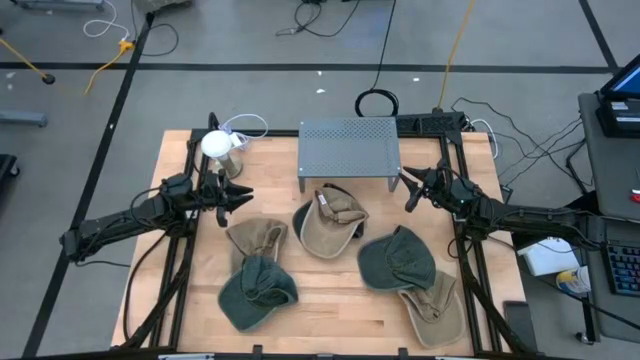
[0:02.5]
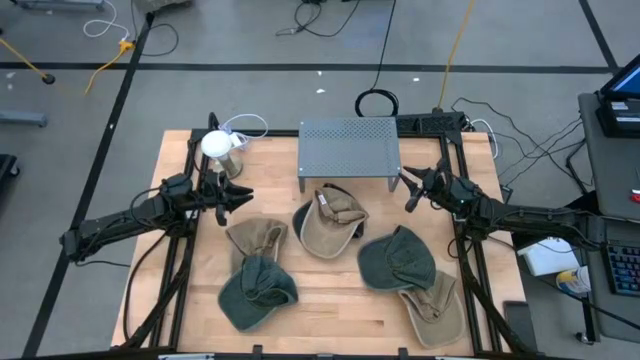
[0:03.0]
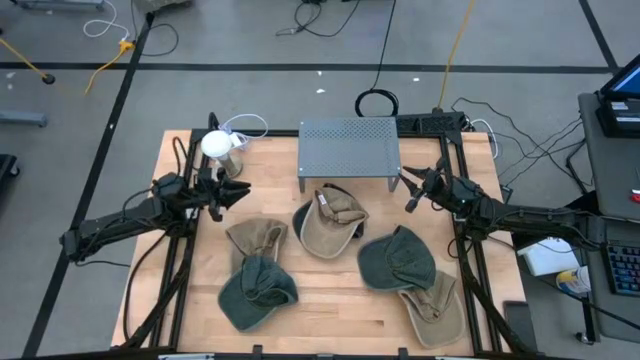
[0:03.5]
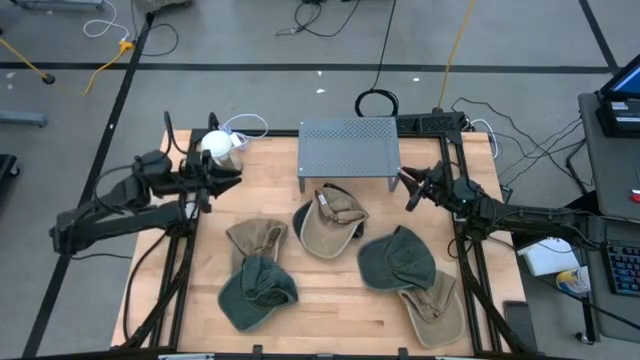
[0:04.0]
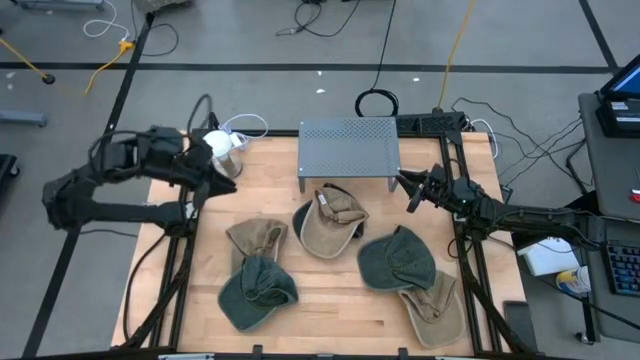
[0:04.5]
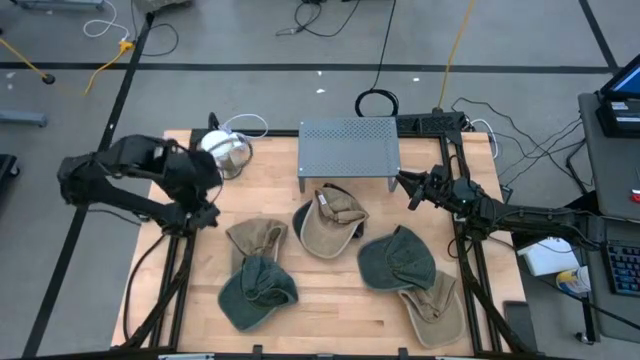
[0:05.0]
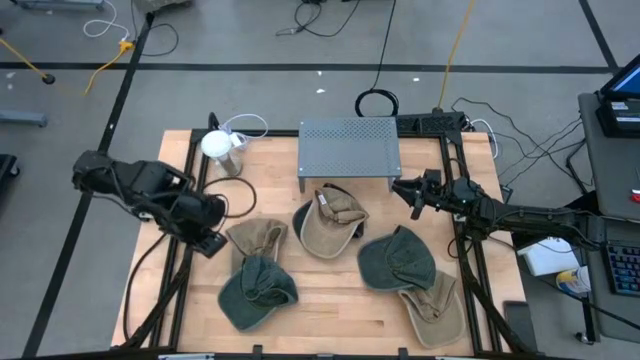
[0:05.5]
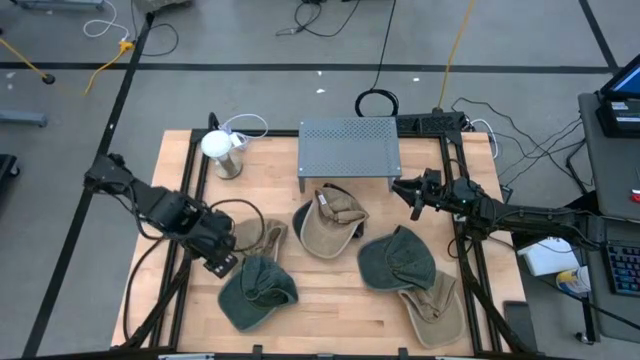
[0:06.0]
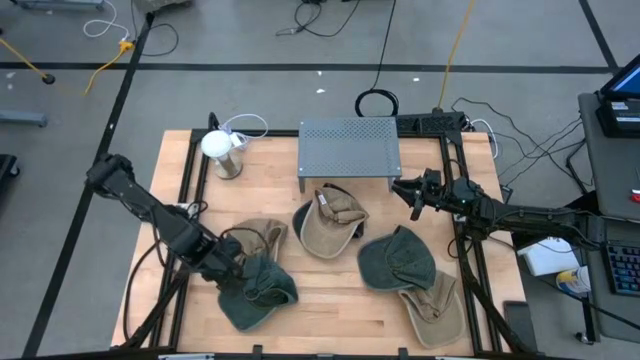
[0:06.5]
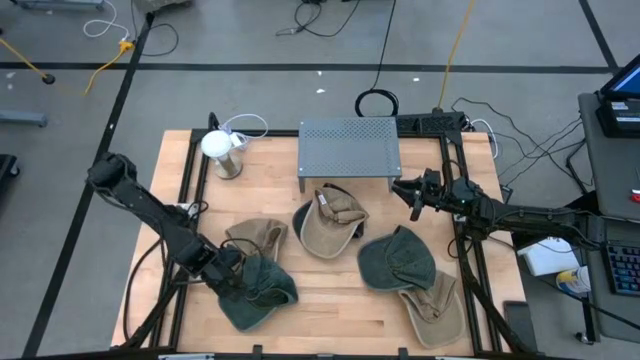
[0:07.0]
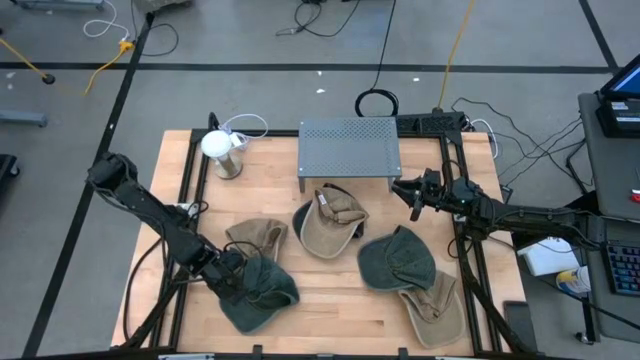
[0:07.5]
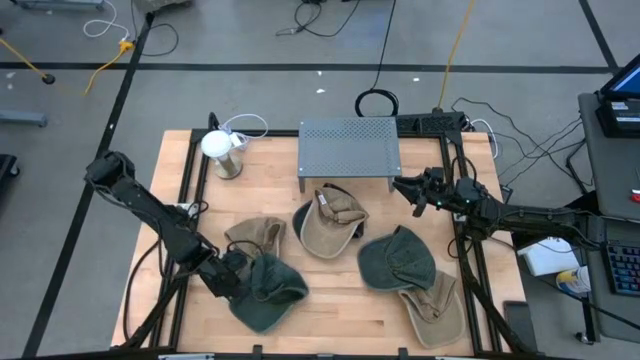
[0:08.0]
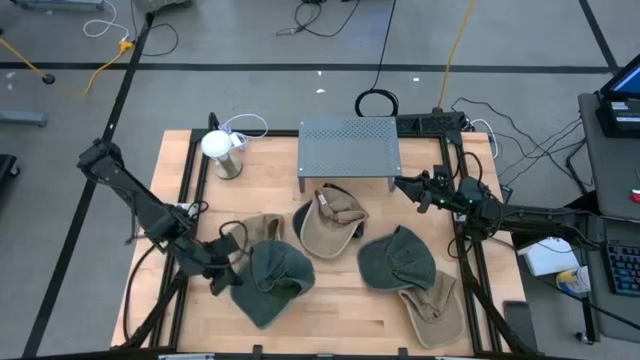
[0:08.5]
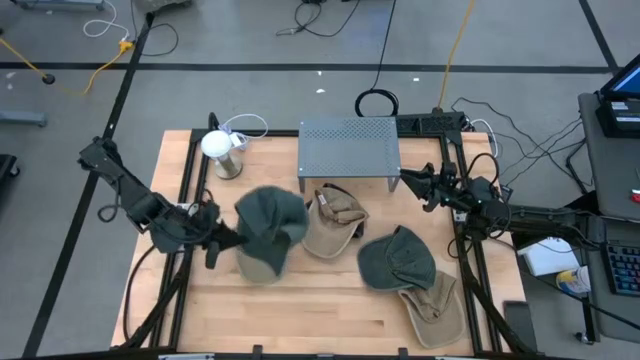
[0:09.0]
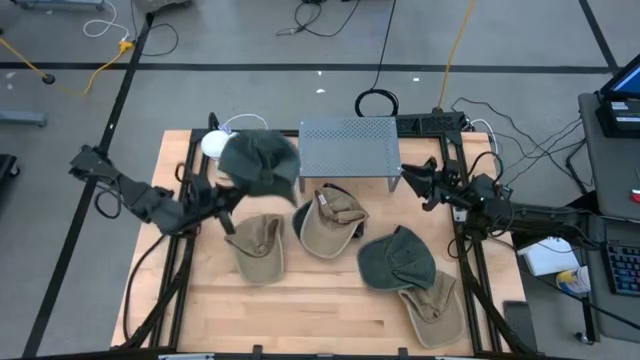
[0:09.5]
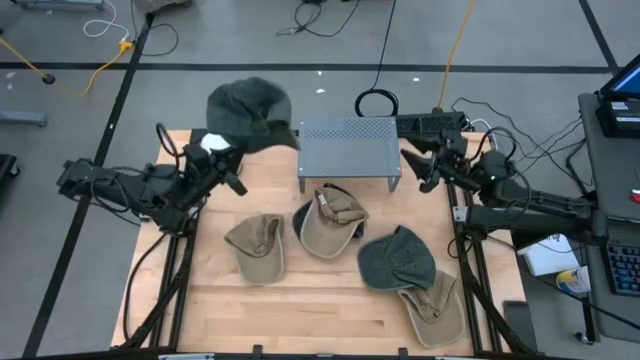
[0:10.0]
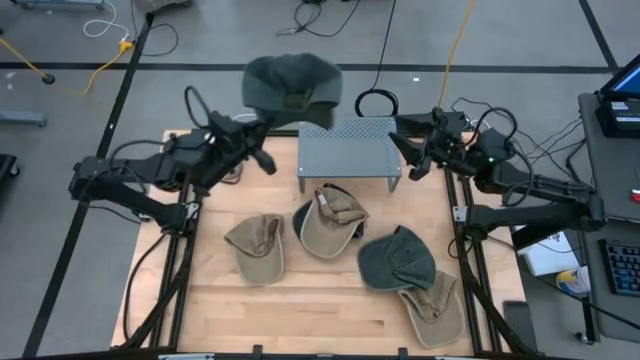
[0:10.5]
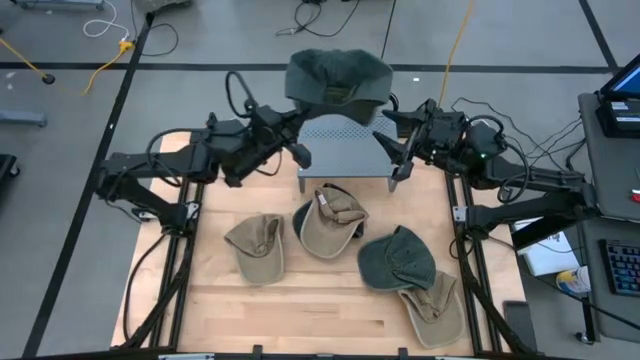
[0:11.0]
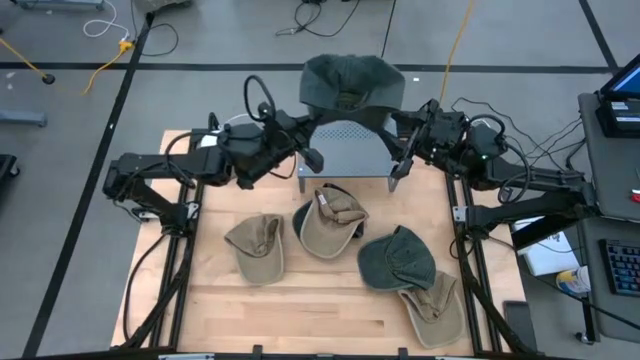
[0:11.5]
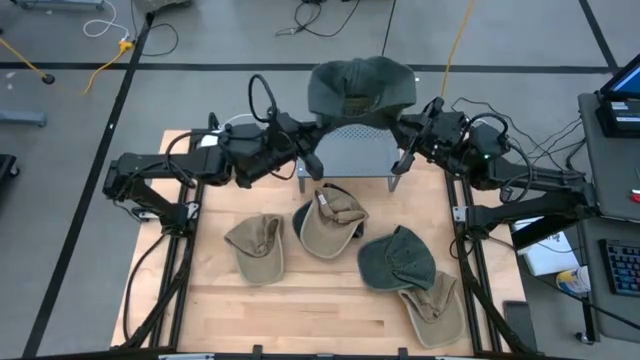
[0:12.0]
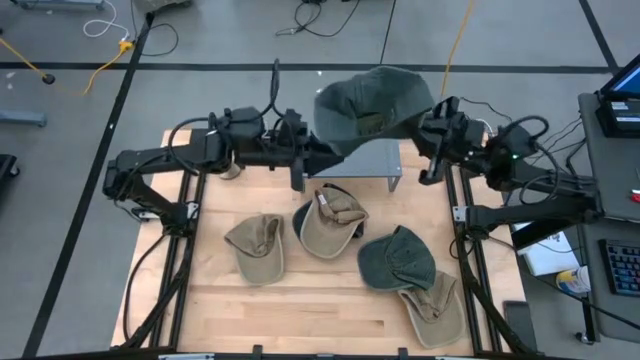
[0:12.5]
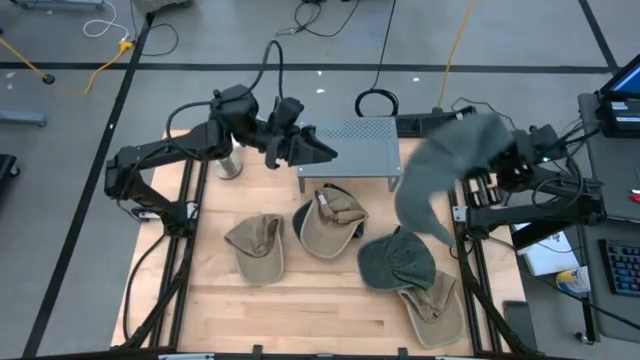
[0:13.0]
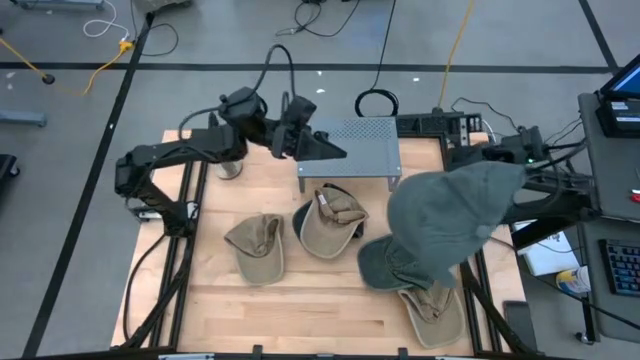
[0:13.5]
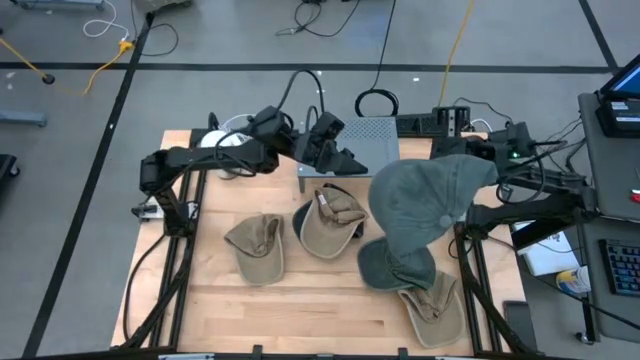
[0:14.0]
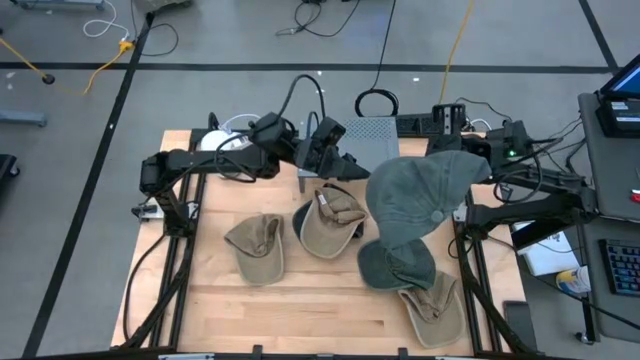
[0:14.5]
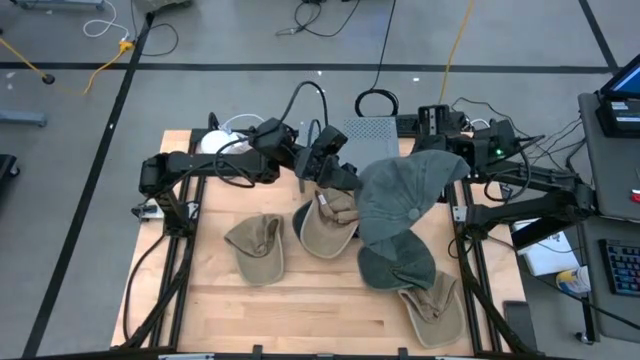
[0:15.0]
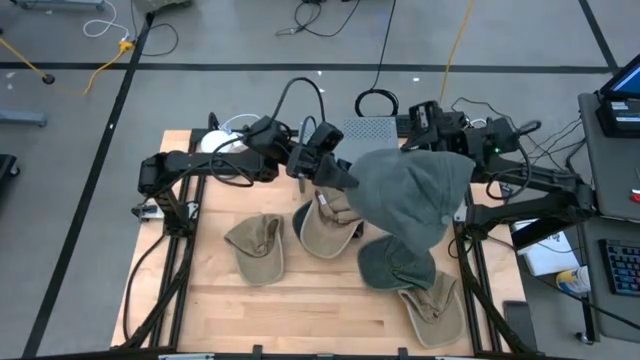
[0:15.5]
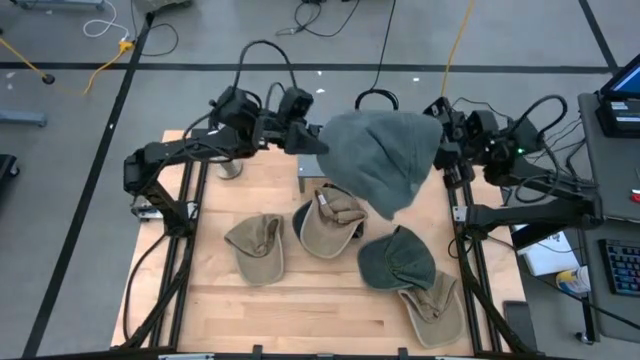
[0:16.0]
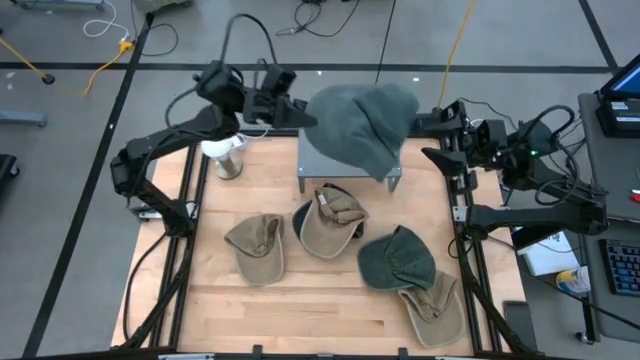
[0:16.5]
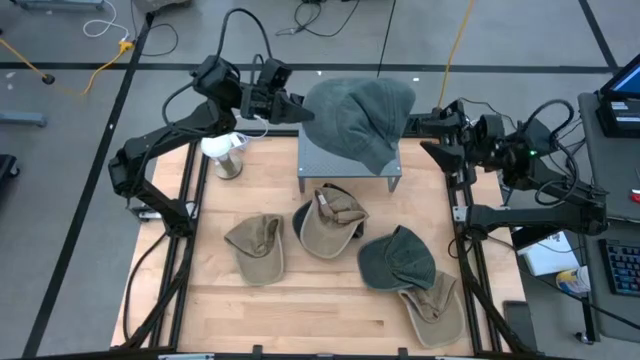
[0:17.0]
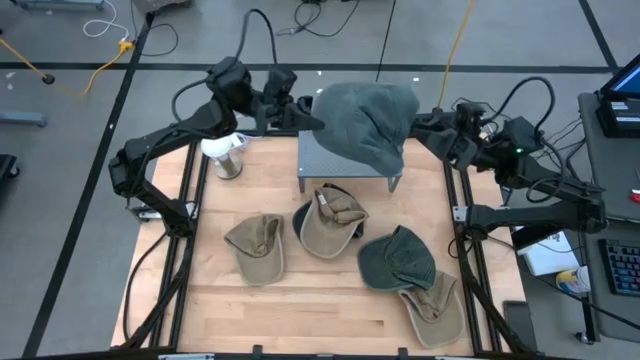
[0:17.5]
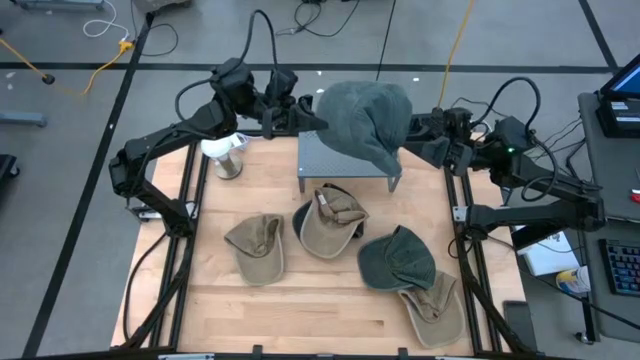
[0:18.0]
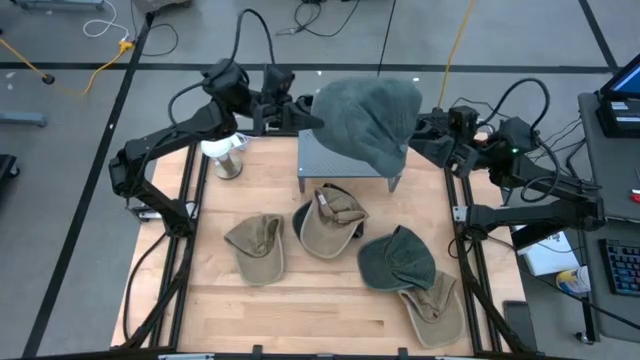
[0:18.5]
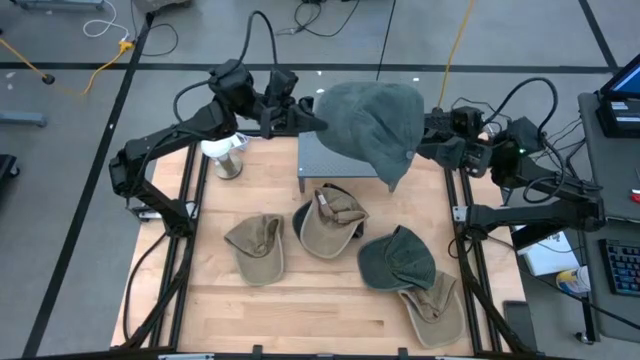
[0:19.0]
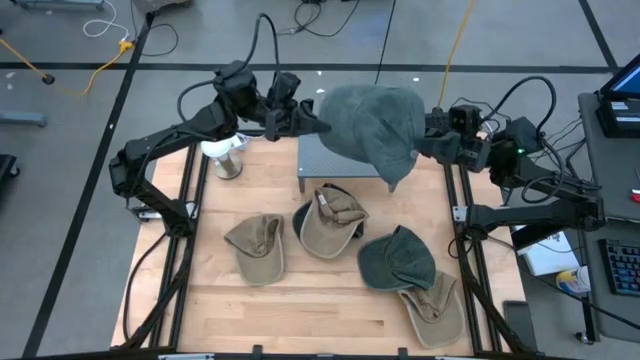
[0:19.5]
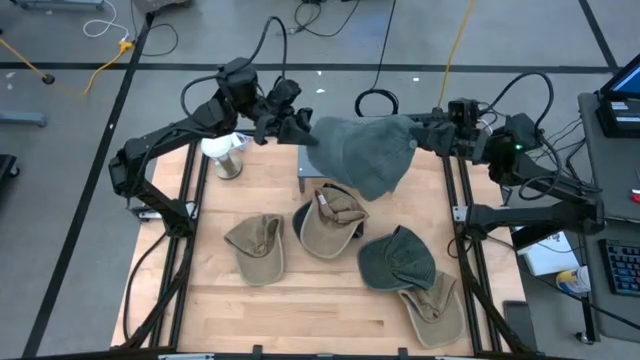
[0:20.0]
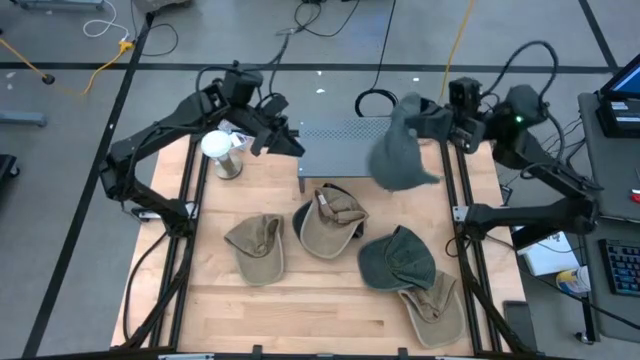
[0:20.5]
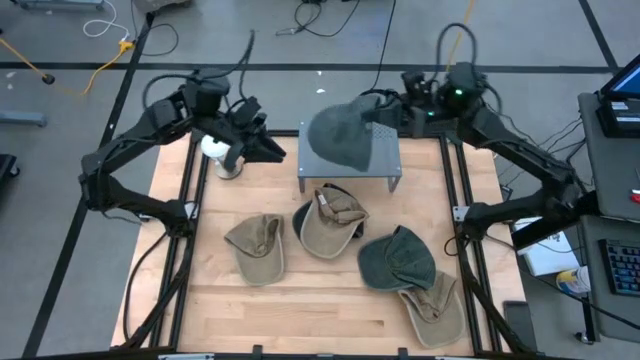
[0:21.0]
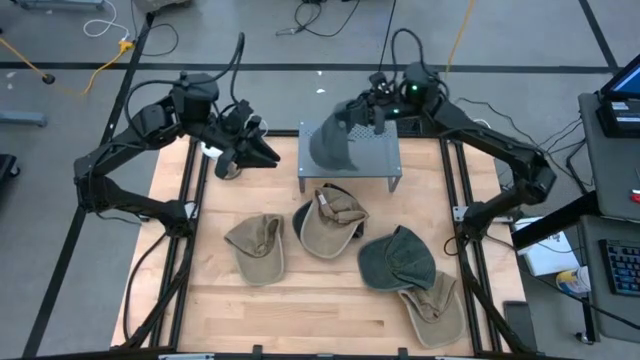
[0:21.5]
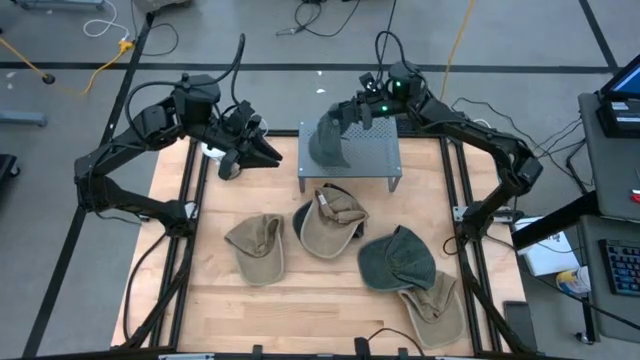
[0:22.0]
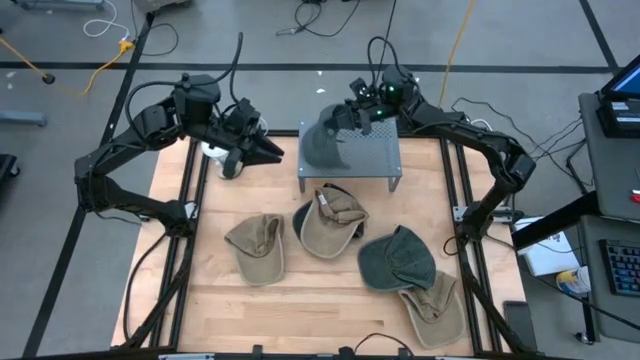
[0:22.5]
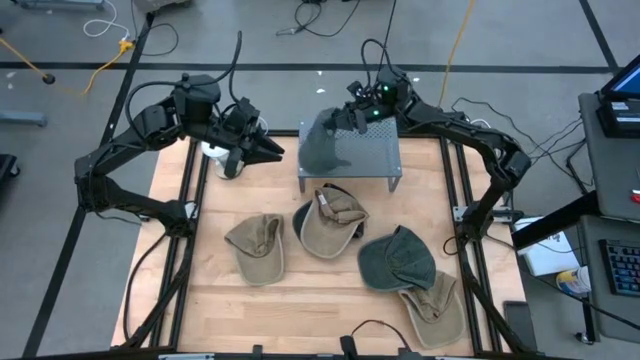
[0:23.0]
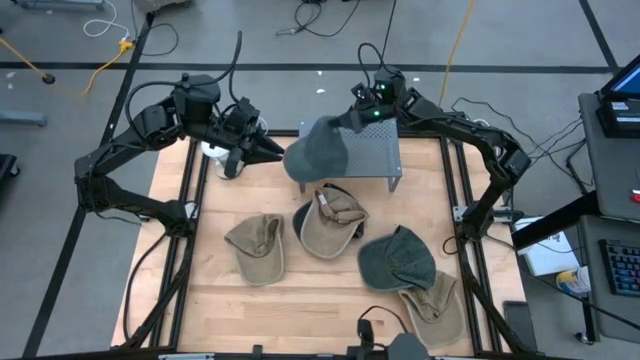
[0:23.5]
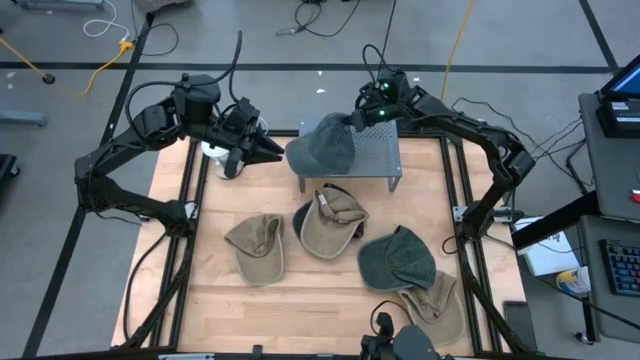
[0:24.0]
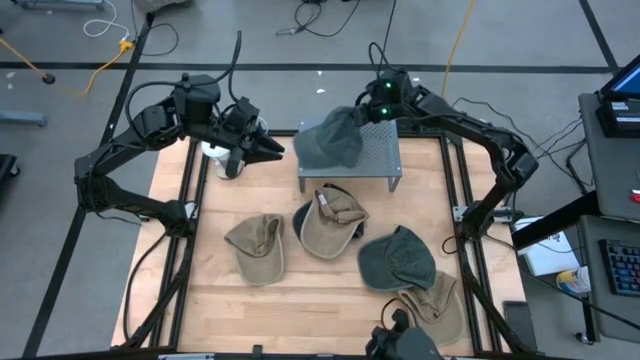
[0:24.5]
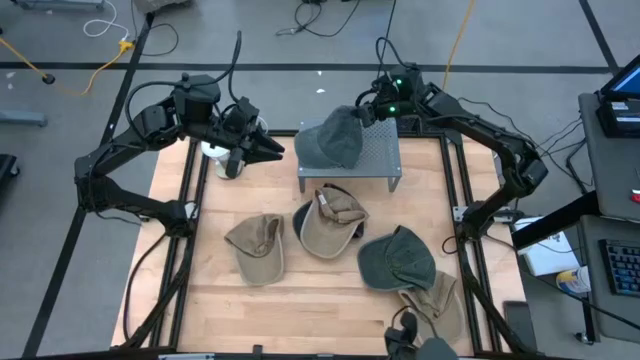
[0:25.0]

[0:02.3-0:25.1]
Task: Pick & Place hat
Put the left green cap on the shelf
